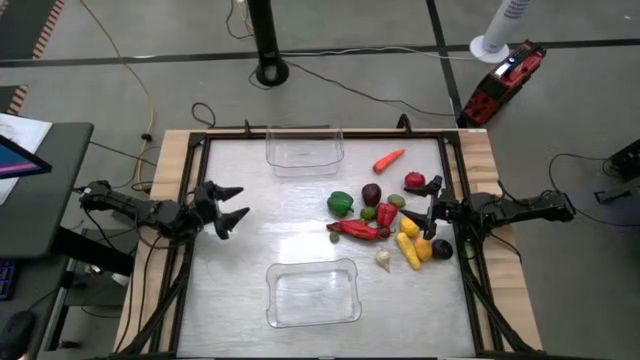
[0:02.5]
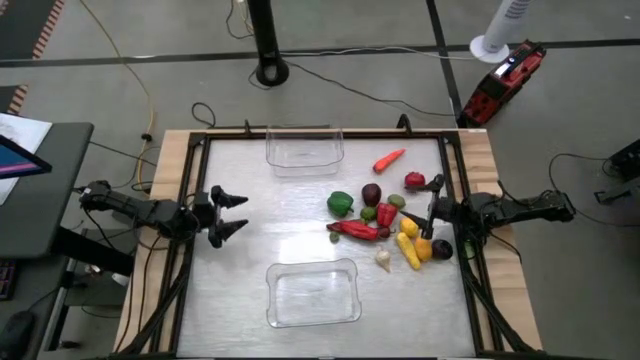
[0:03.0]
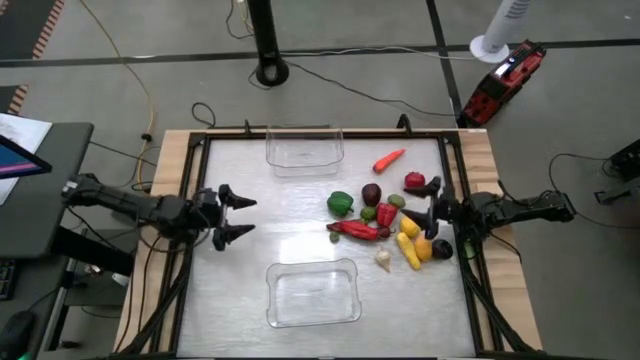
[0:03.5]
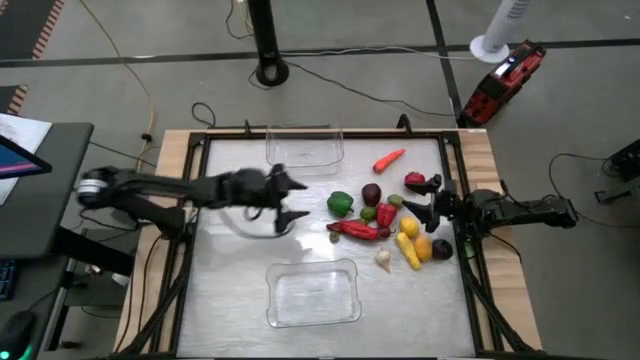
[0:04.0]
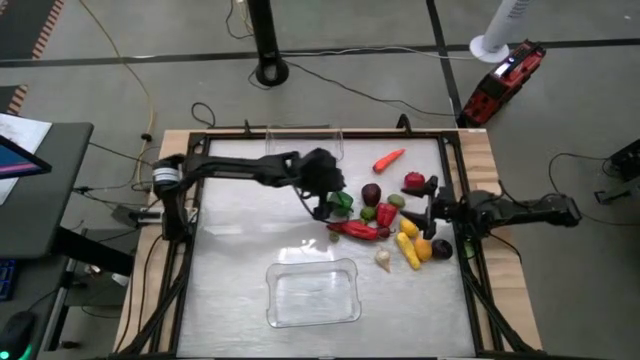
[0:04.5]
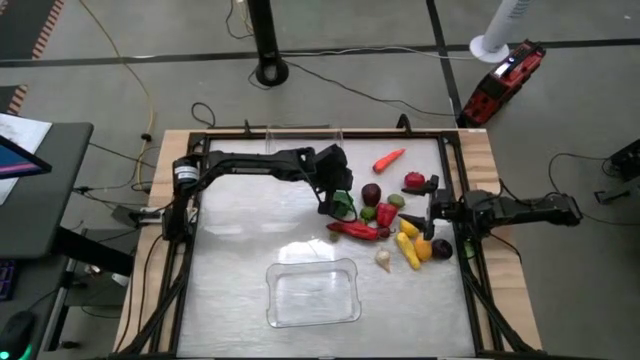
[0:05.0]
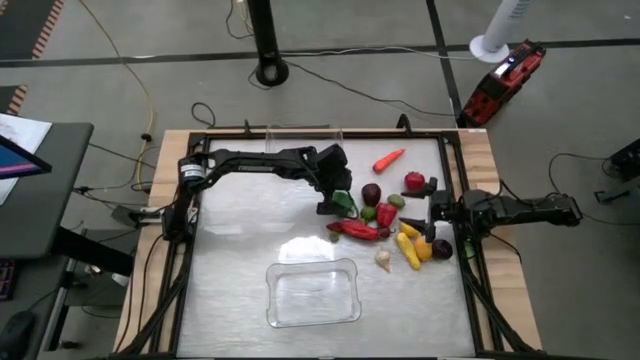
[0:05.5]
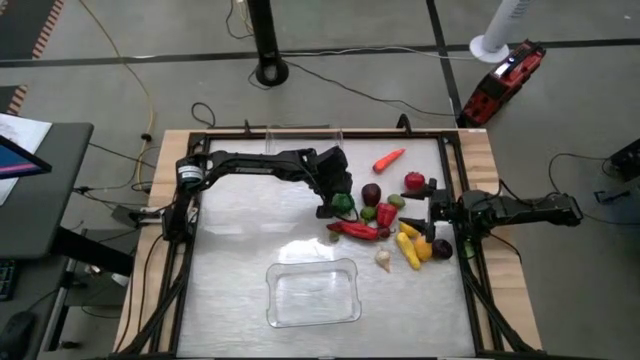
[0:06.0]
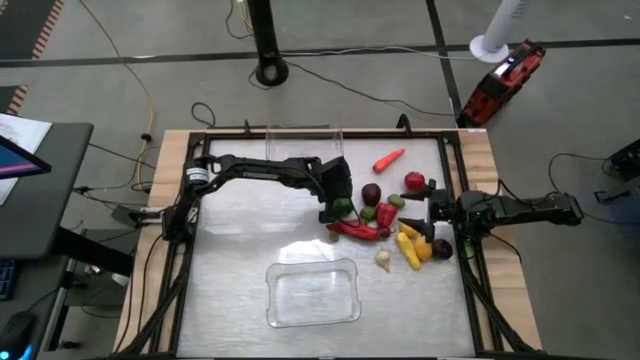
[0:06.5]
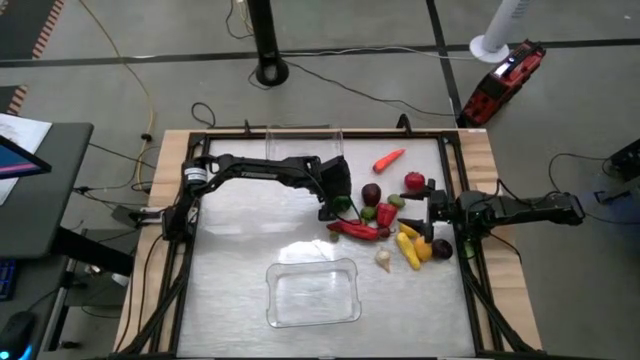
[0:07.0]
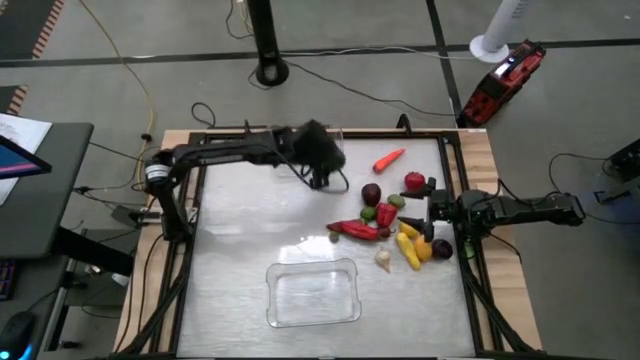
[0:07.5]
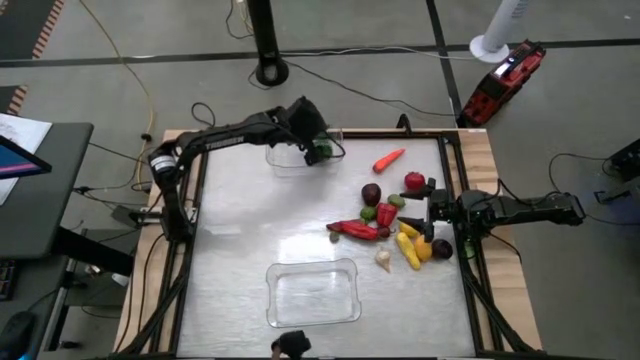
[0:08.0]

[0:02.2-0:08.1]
Task: Sort produce into baskets
Put the green bell pepper into the top transparent bin

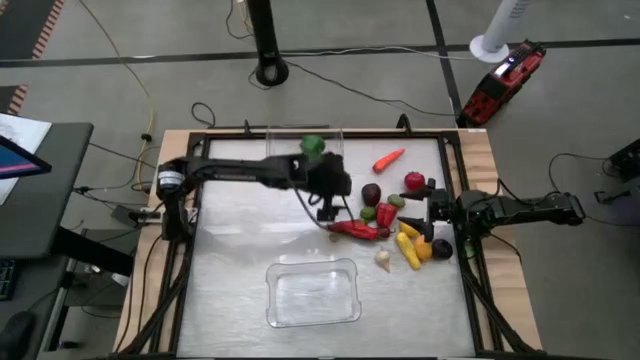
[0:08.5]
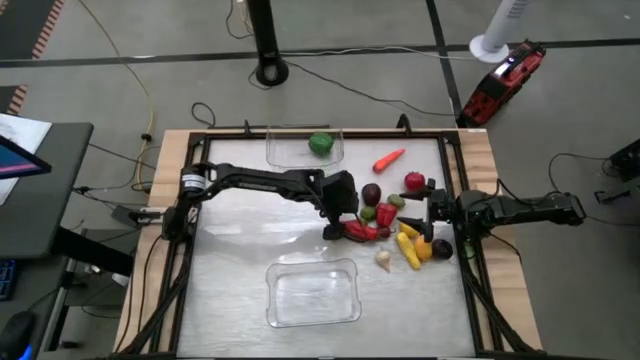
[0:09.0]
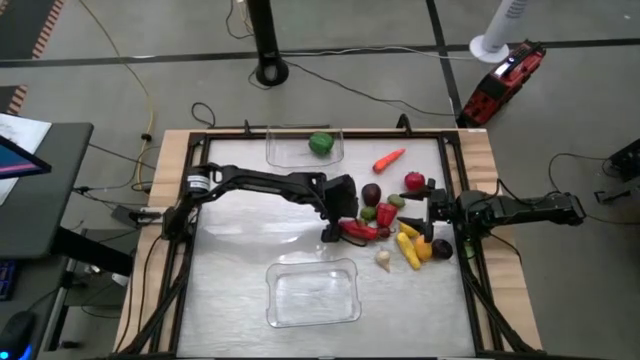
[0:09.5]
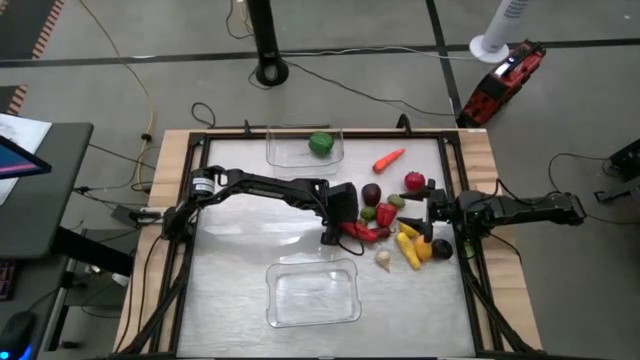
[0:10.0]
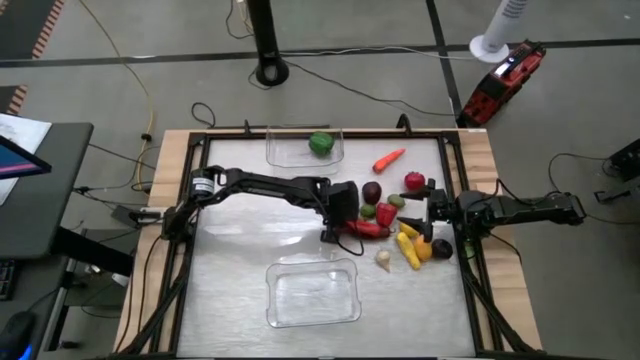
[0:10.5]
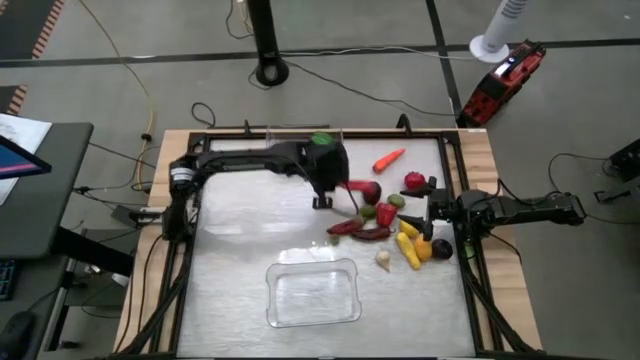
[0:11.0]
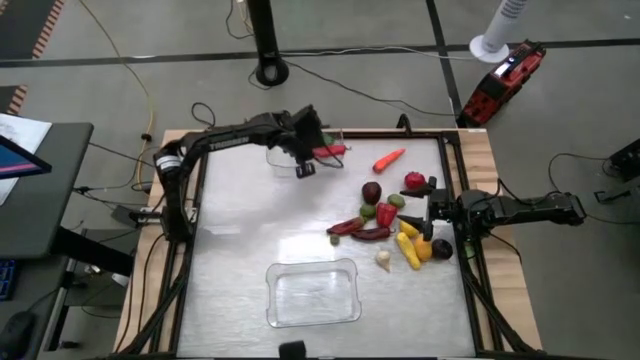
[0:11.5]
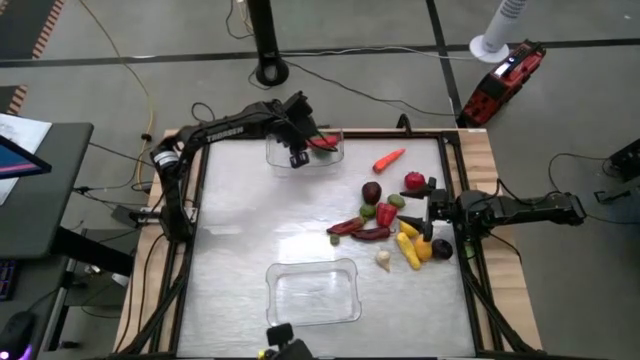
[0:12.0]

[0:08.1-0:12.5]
Put the top red pepper into the top transparent bin

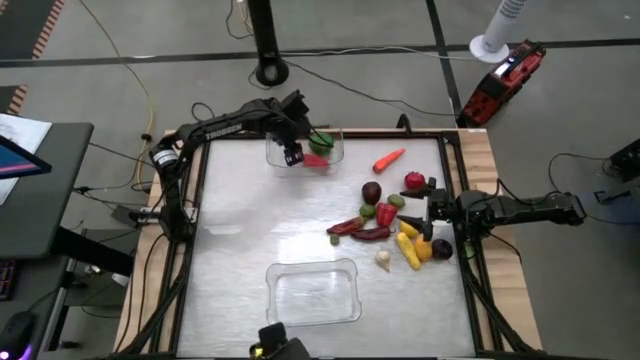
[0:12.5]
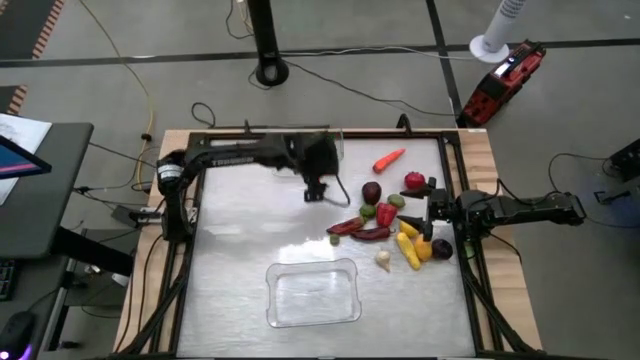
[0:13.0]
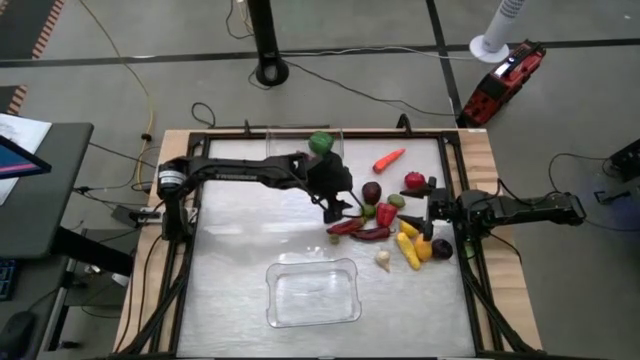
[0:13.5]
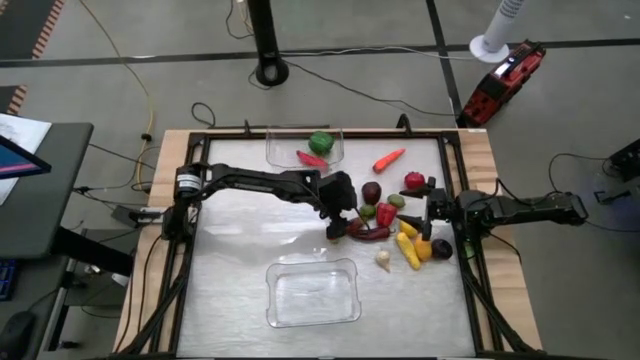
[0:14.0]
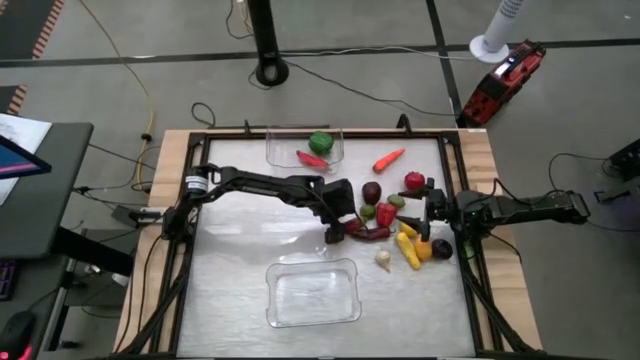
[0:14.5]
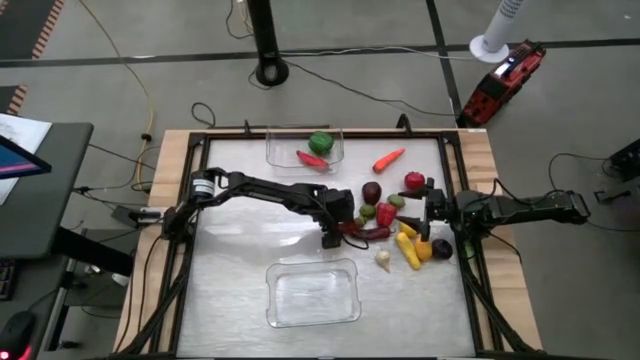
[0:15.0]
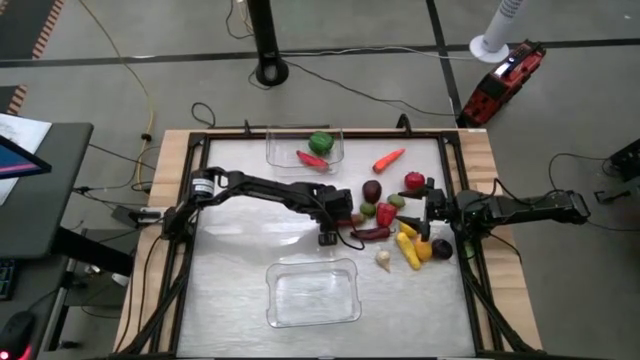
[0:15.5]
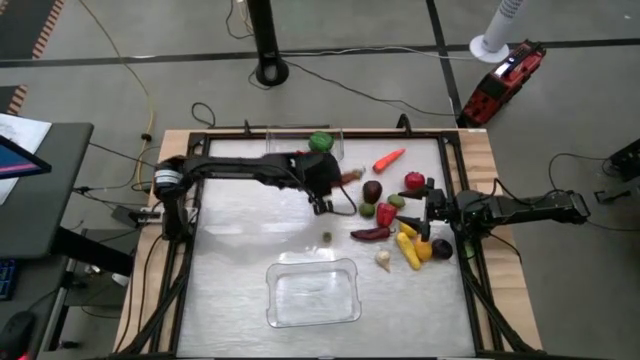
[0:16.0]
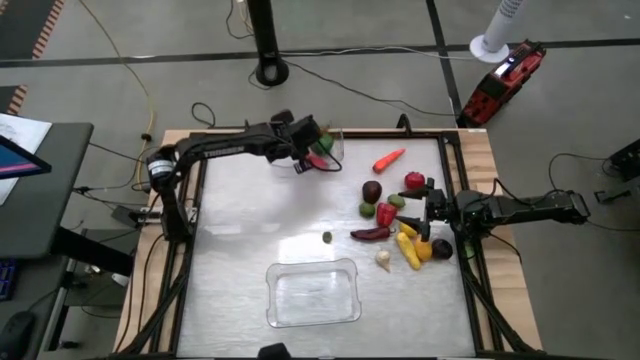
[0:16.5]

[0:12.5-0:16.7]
Put the left red pepper into the top transparent bin

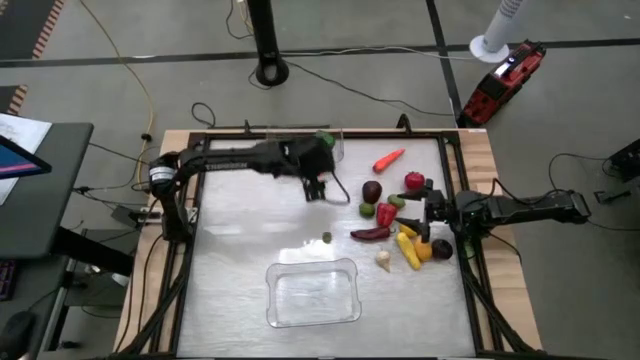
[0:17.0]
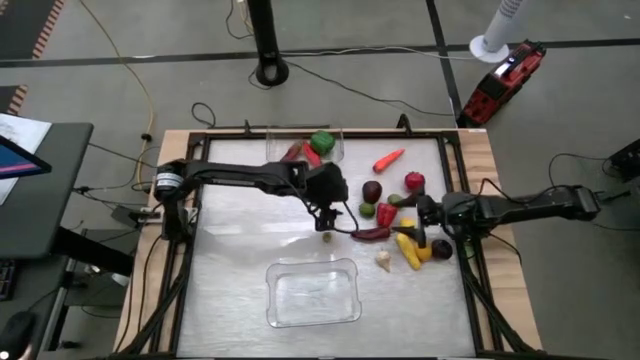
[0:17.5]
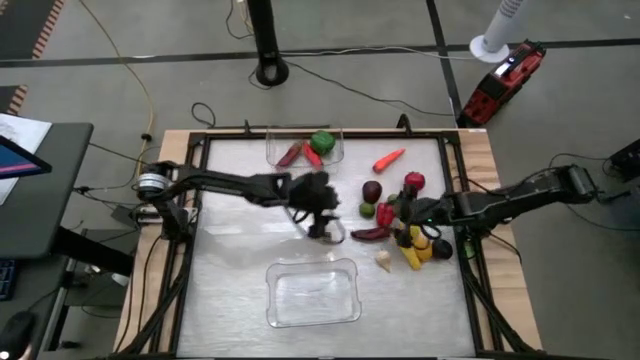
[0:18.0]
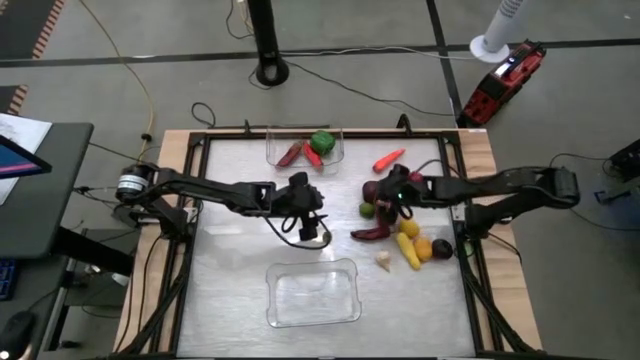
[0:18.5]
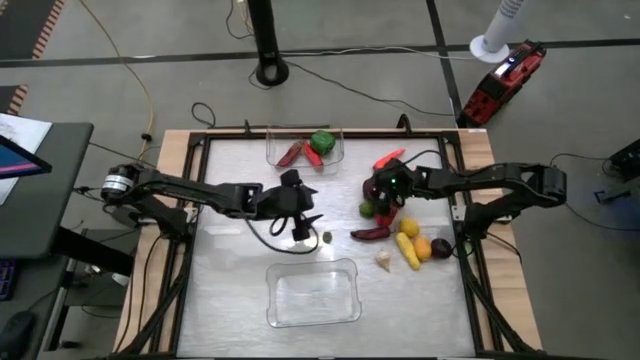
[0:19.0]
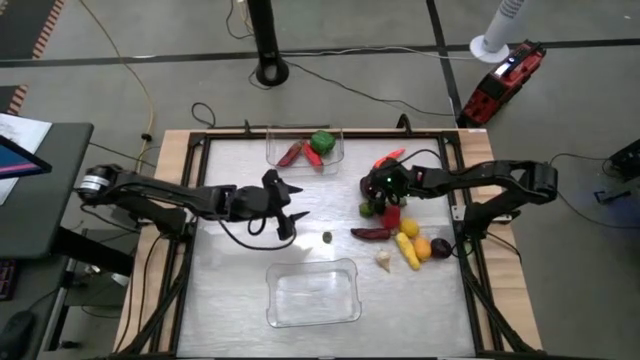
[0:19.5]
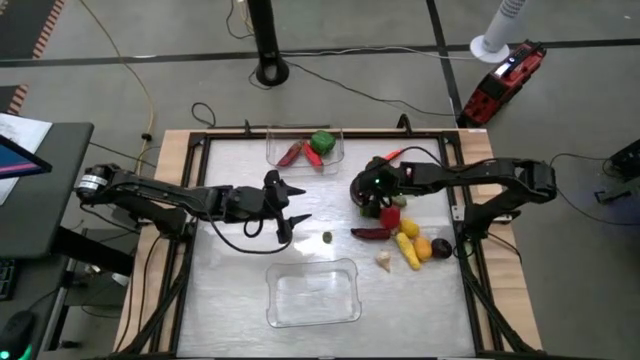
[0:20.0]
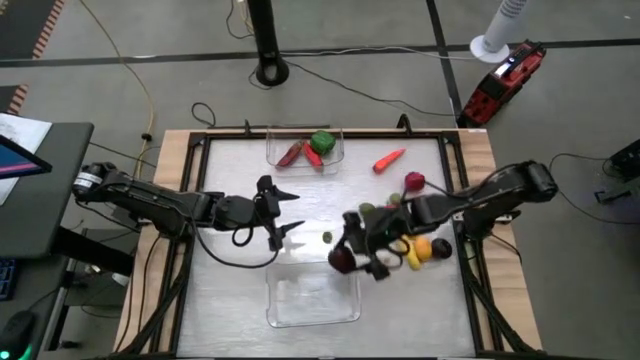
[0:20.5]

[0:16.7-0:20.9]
Put the red apple into the bottom transparent bin

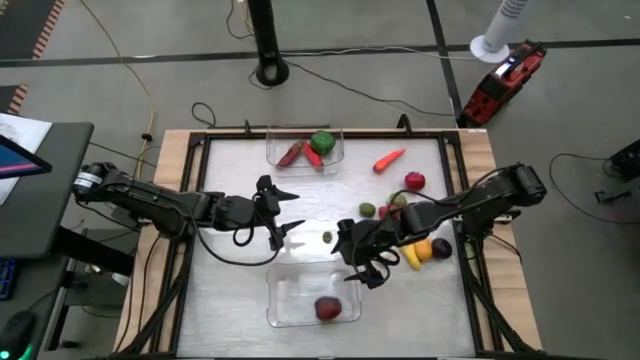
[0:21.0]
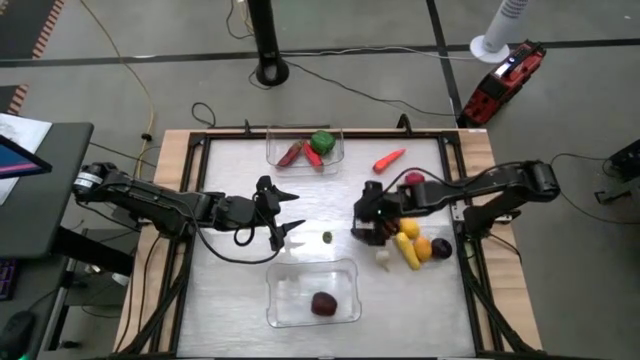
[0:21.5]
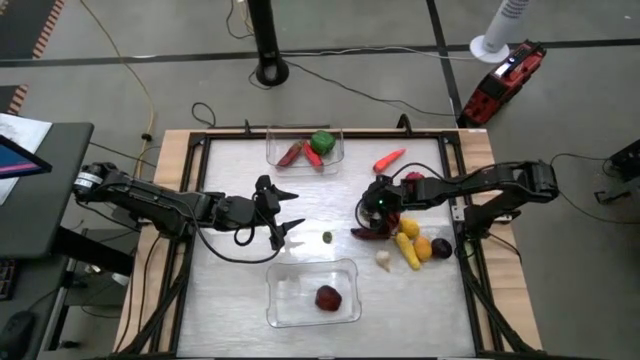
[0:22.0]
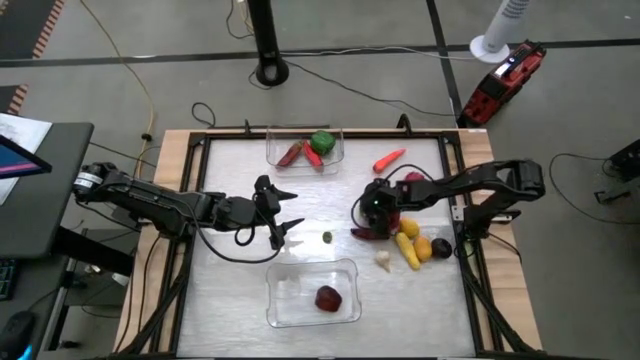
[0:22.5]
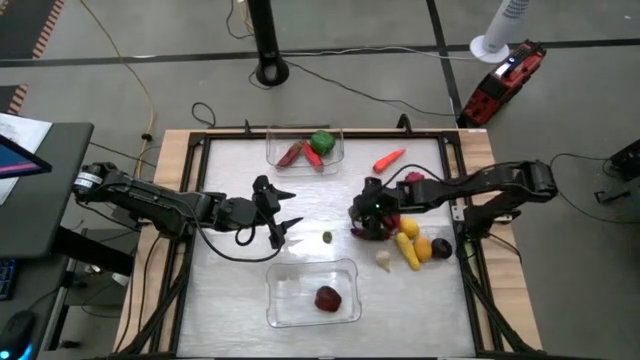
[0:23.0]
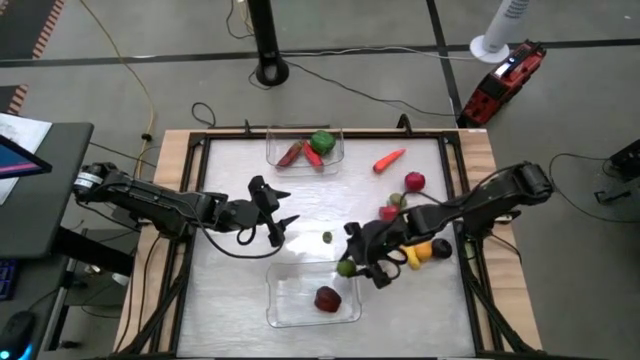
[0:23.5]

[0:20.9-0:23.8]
Put the left lime into the bottom transparent bin
